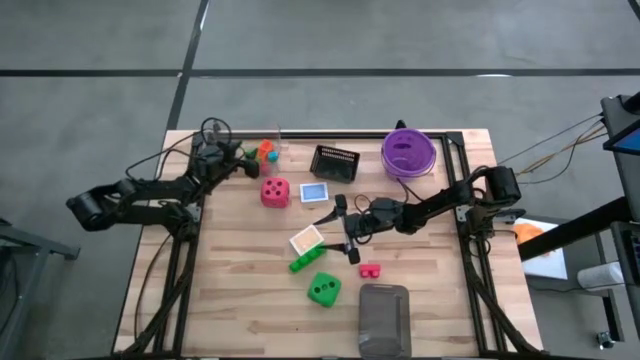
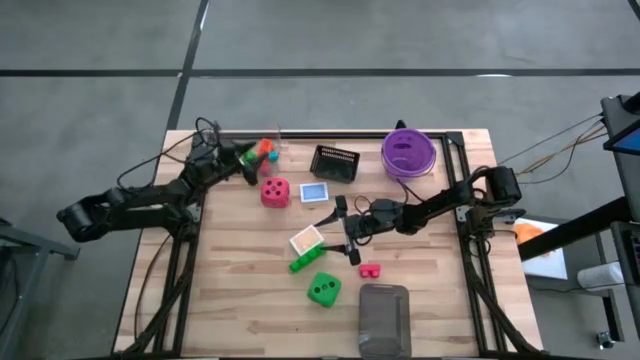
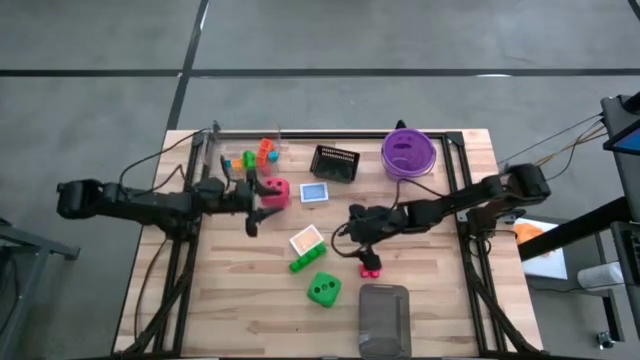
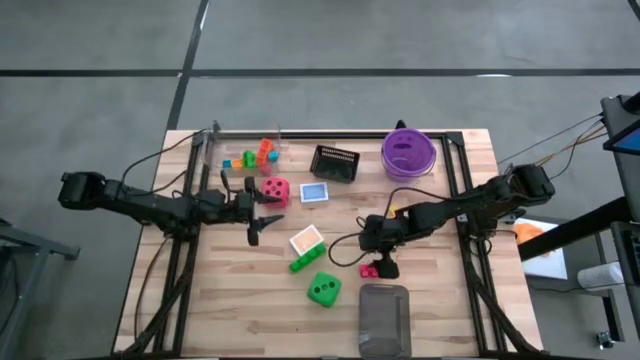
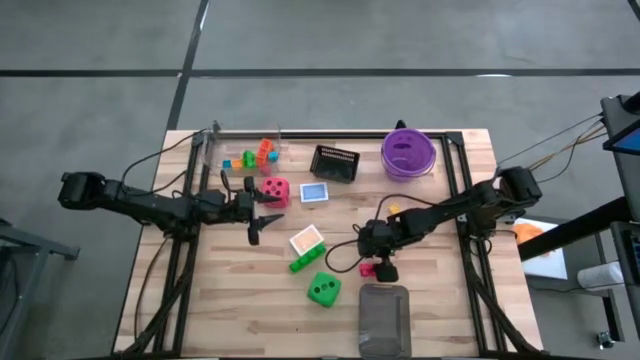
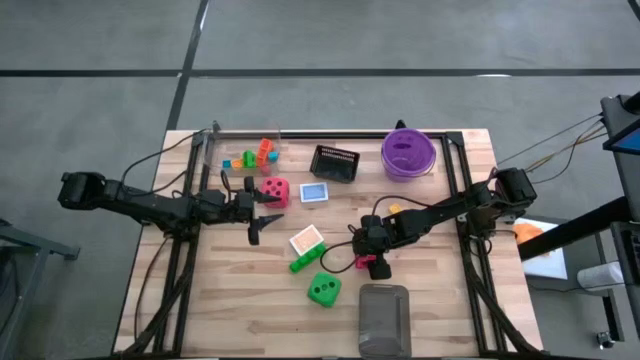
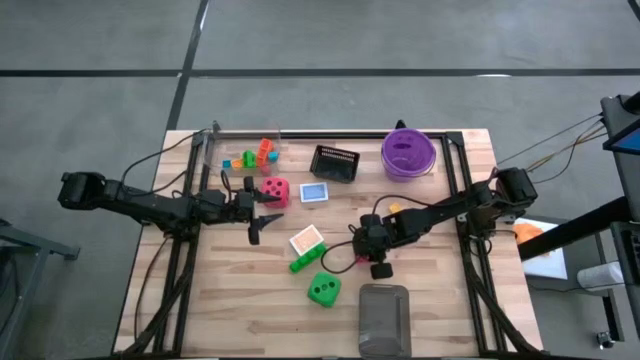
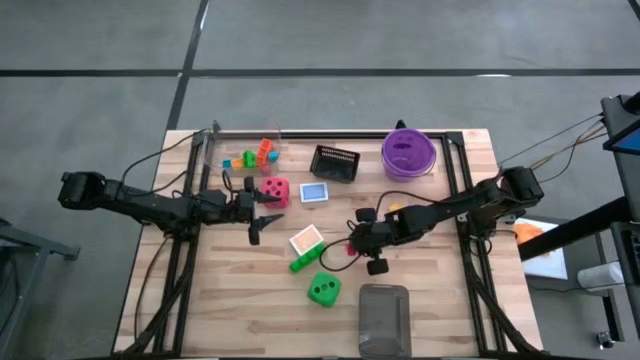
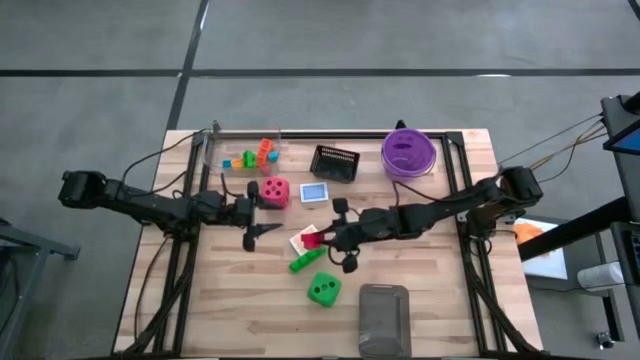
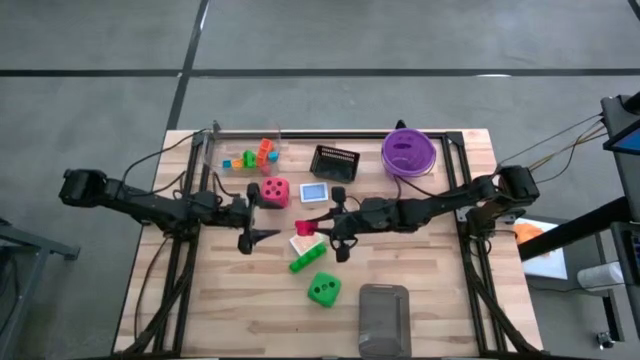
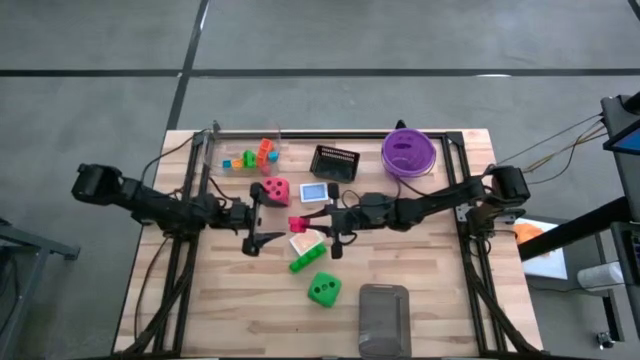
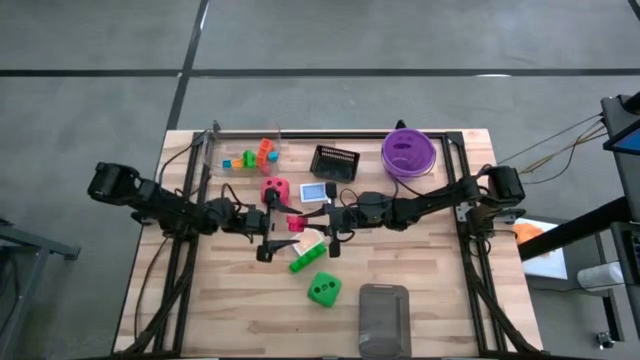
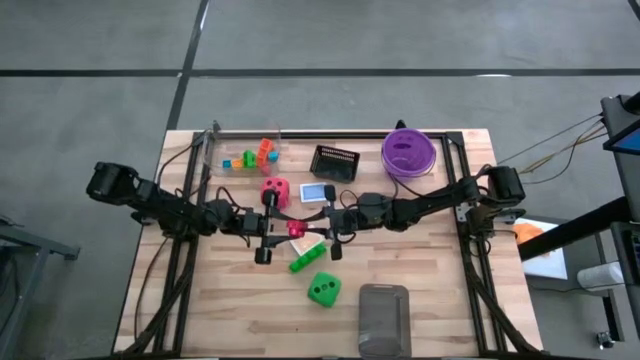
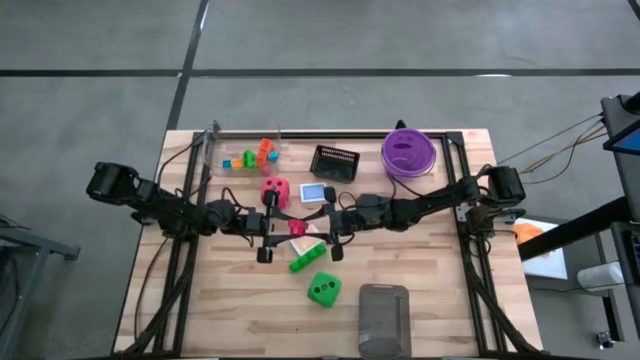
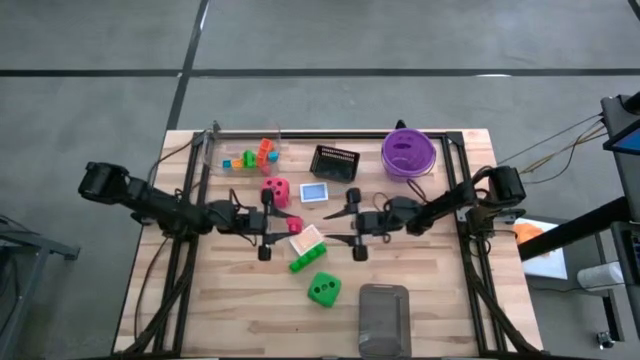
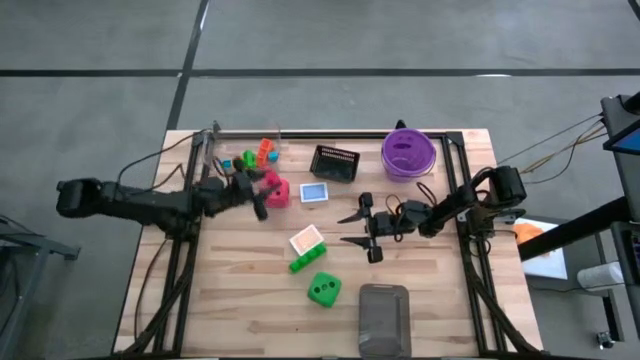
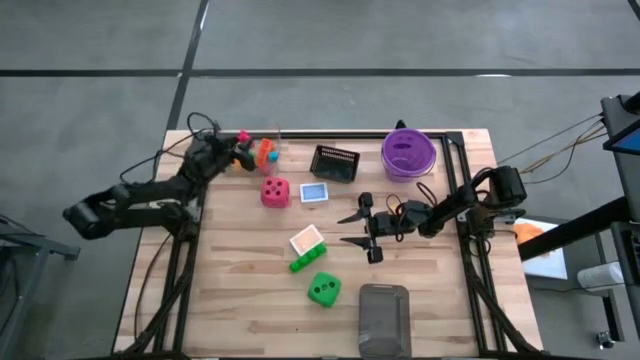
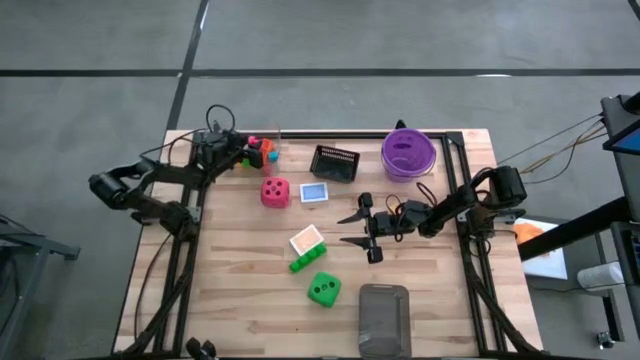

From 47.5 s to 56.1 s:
Task: Pick & Place Toys
Put the red game piece into the transparent bin

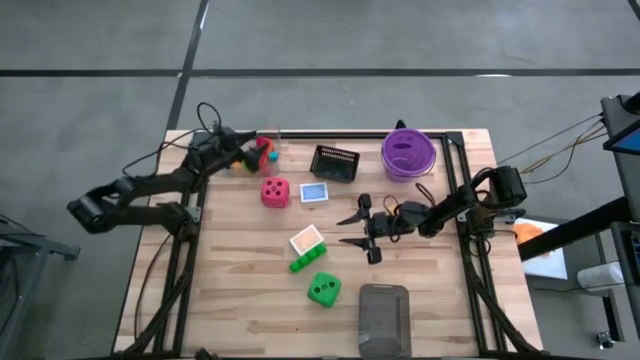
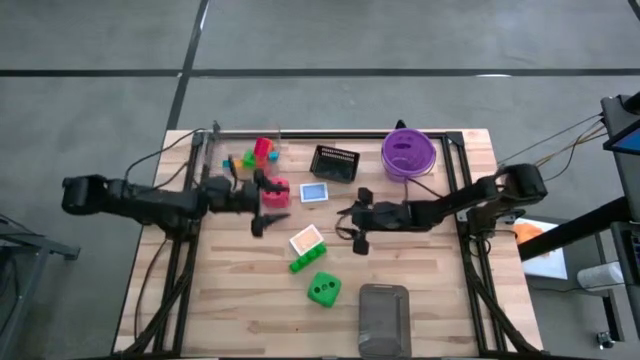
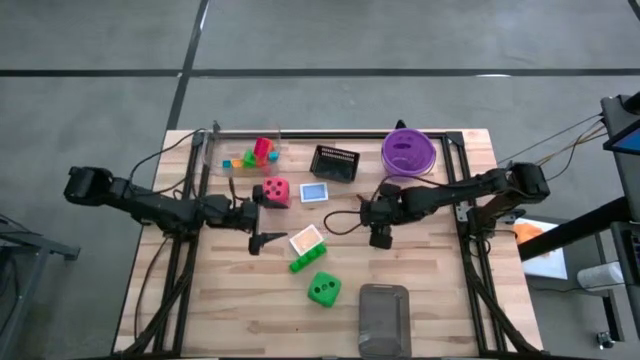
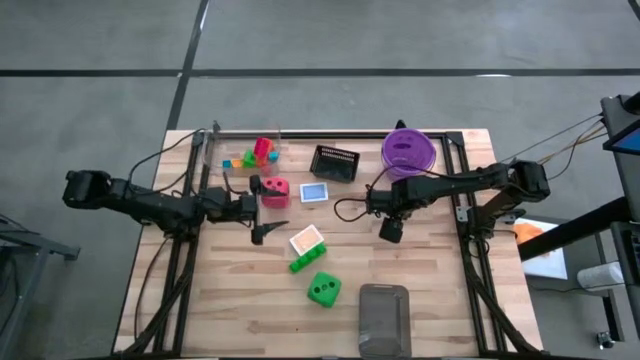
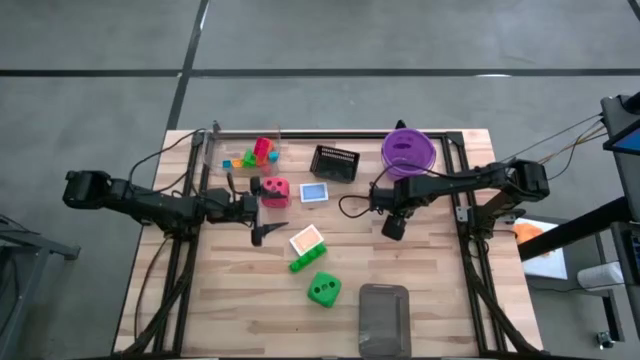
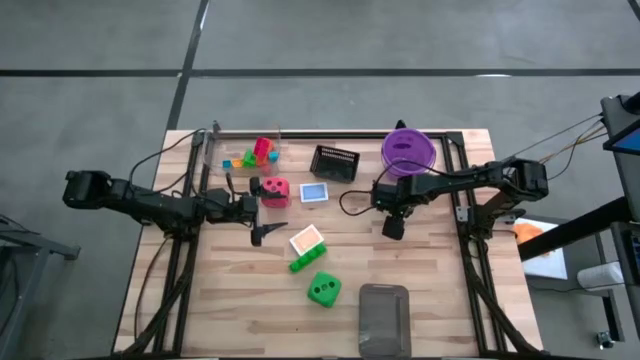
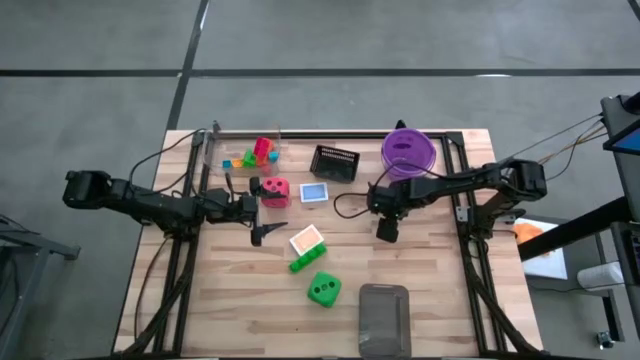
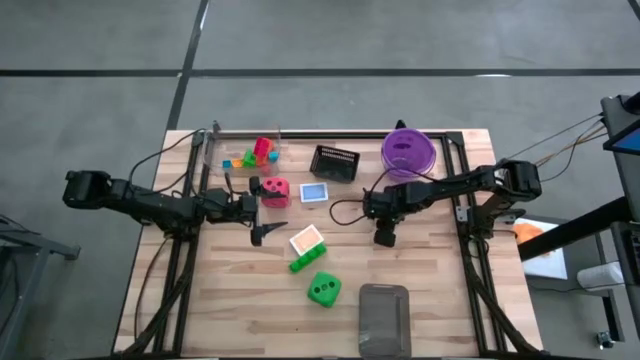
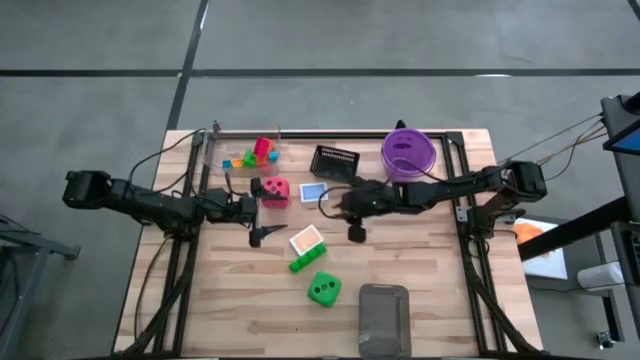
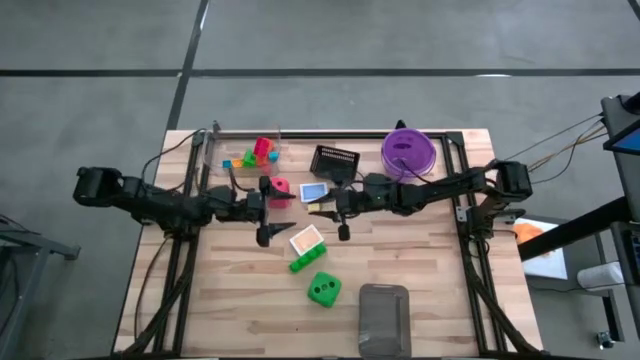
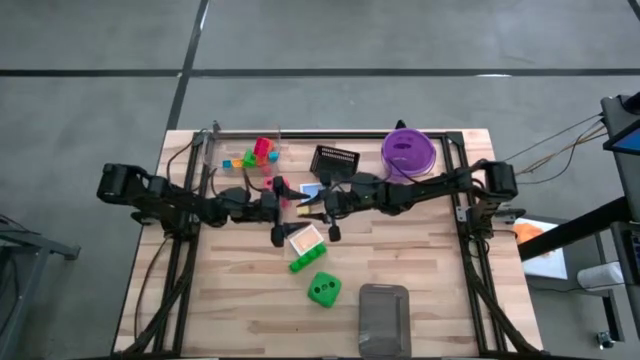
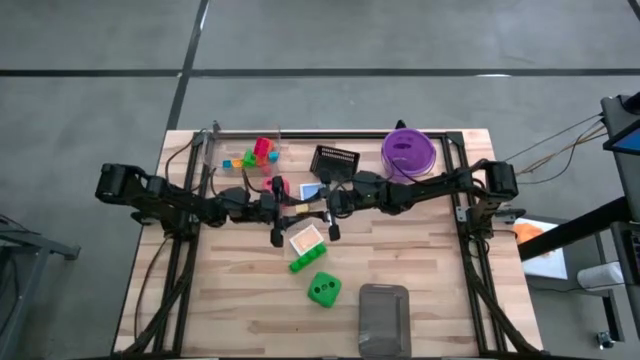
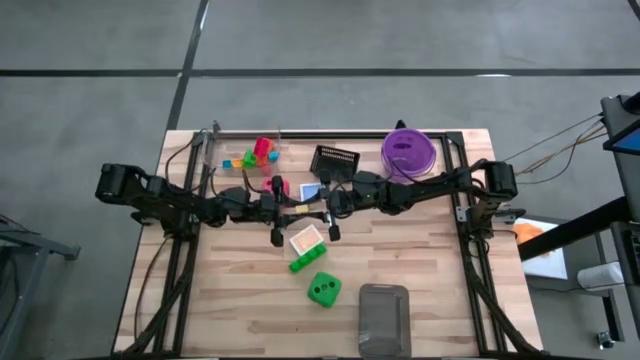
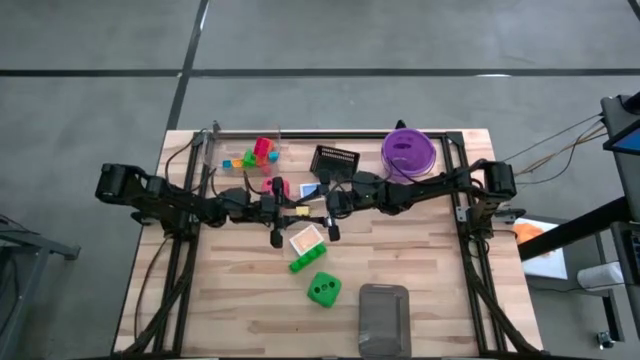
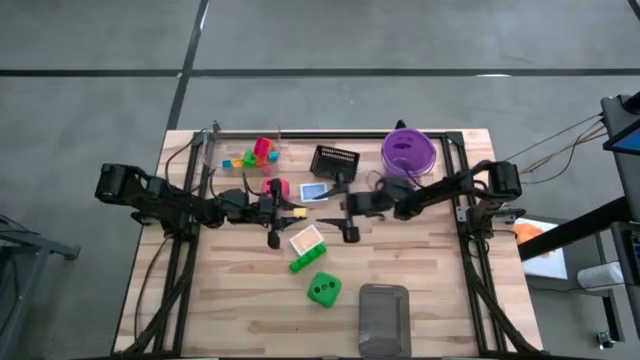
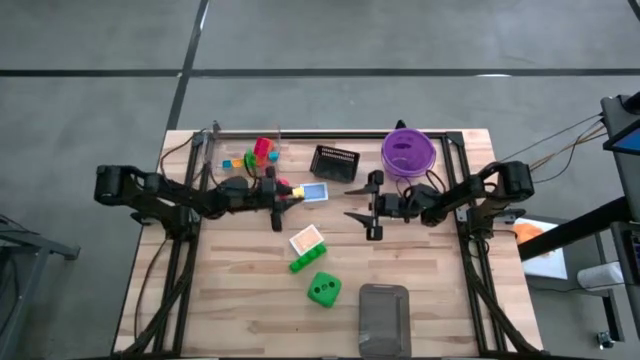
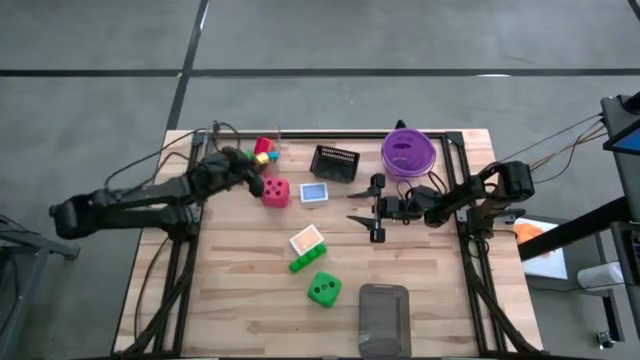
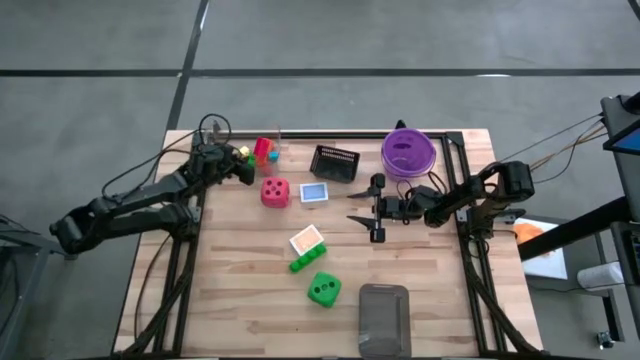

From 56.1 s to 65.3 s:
Put the yellow game piece into the transparent bin

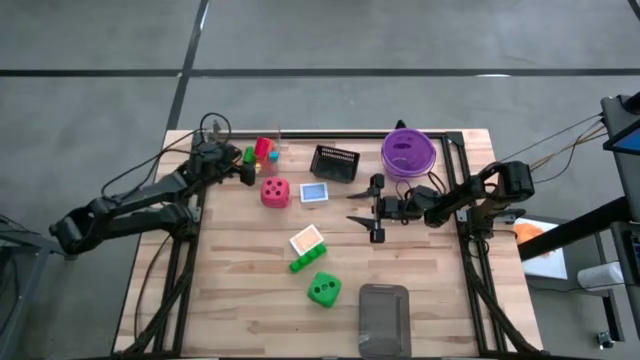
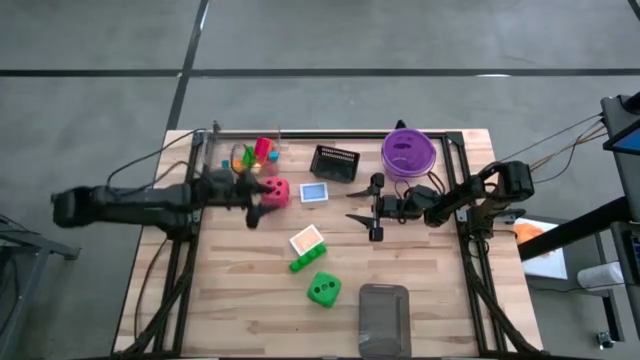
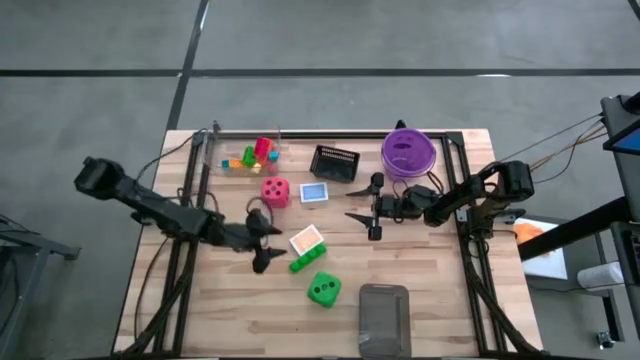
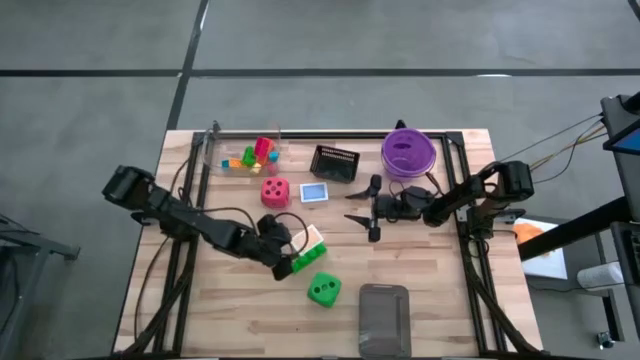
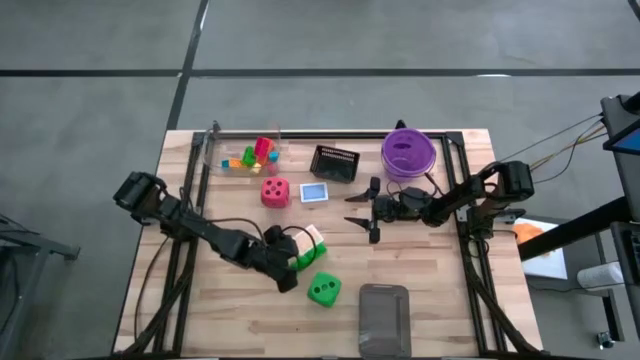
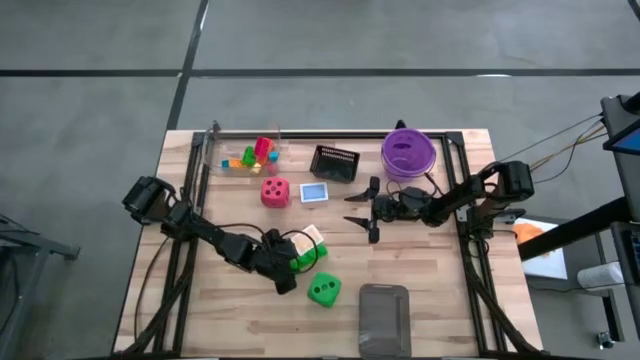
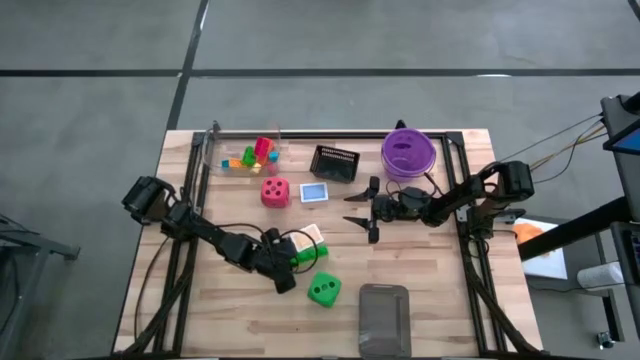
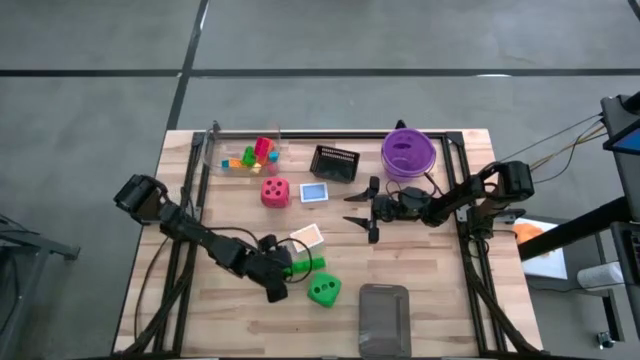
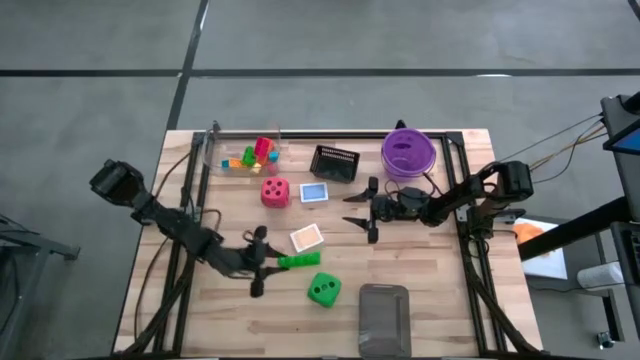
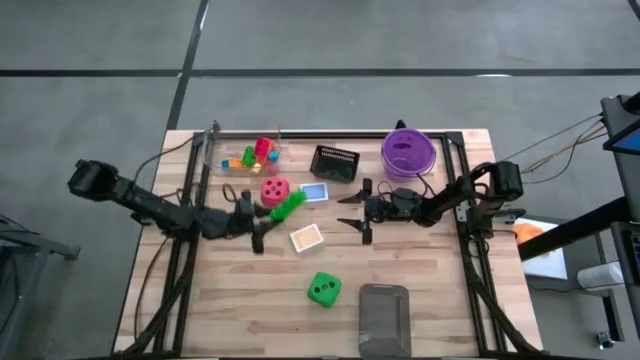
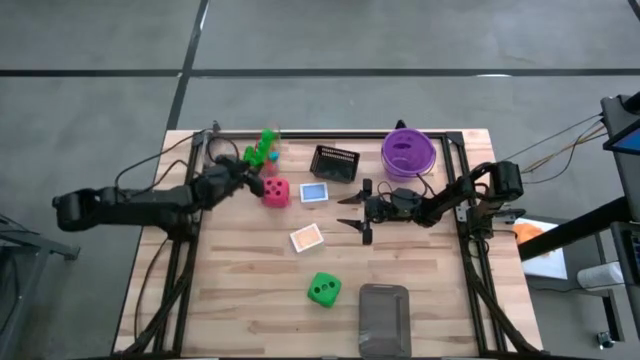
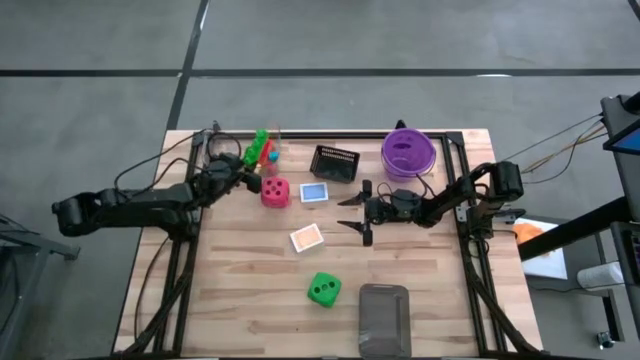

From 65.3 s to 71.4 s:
Put the green game piece into the transparent bin
